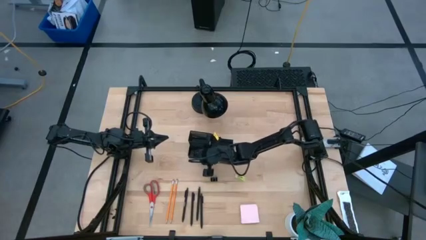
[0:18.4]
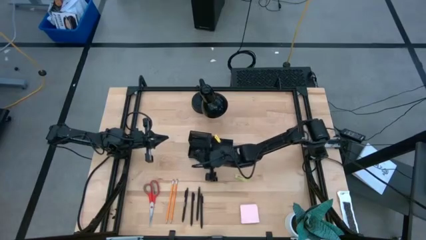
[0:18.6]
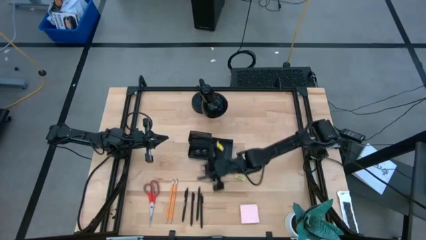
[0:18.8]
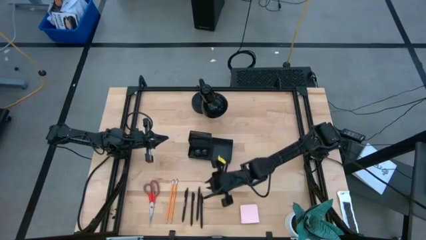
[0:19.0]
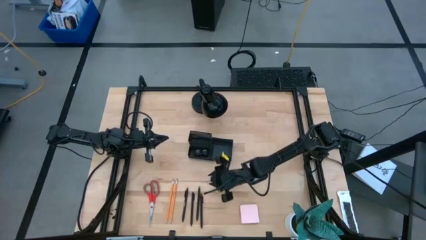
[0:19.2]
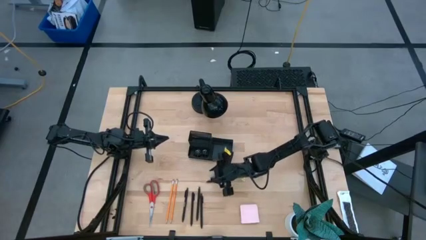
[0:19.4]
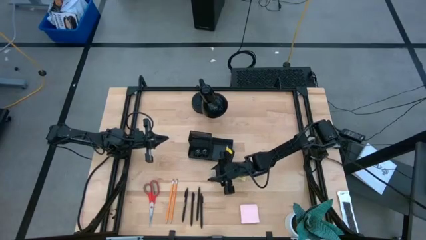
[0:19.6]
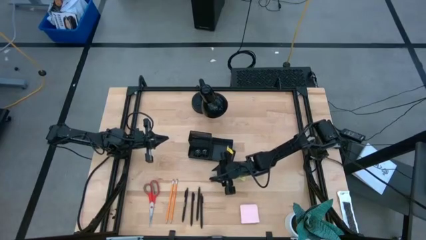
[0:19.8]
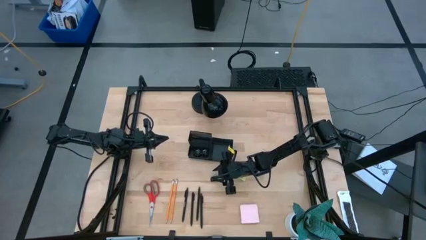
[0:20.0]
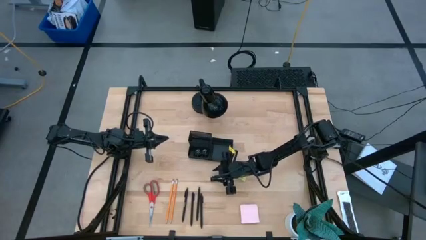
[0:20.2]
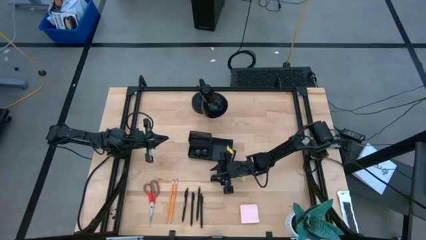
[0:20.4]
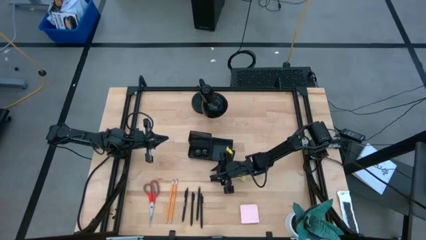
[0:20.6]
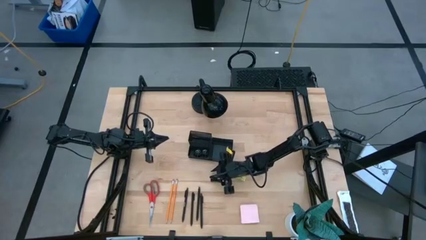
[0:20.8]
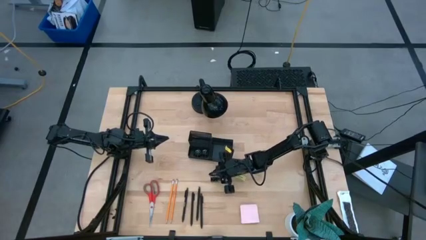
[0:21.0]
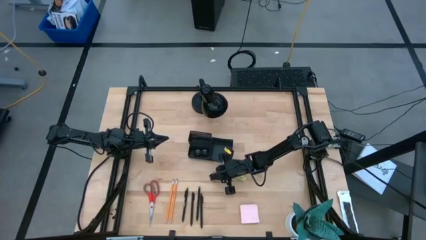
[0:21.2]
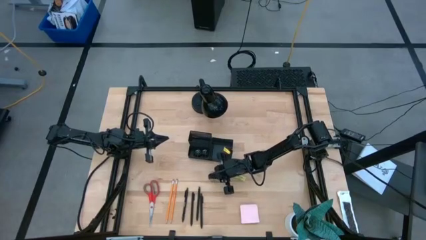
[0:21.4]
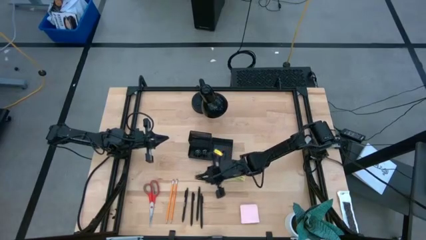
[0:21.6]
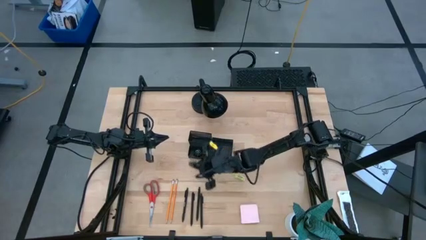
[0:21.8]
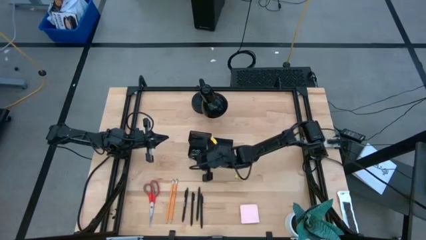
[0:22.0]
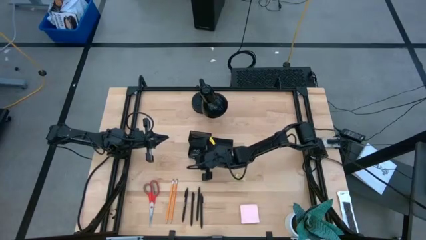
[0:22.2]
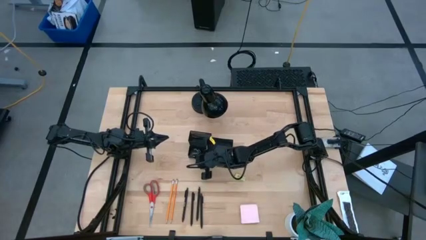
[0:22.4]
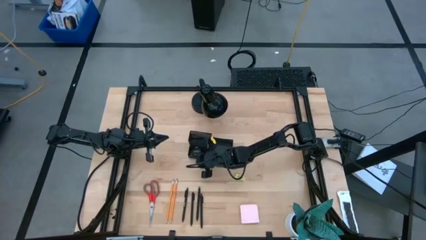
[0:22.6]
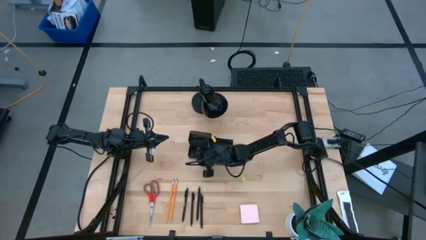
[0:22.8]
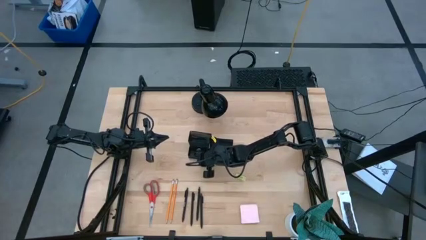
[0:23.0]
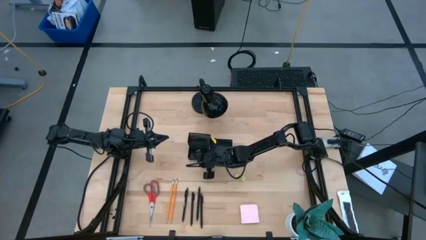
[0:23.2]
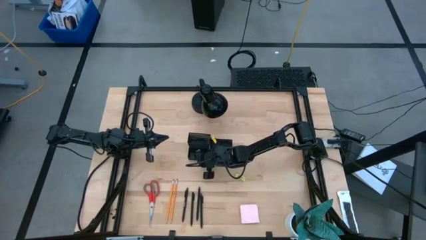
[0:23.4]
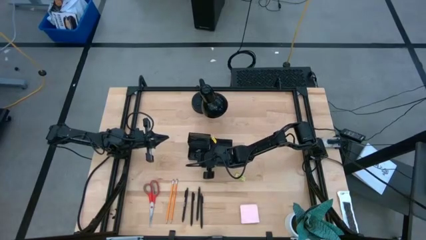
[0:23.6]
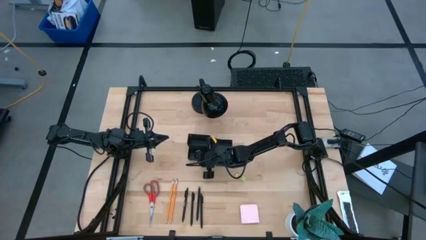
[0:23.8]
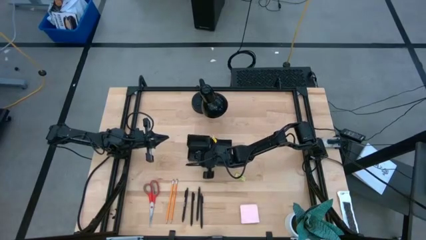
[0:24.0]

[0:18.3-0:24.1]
Task: Pick and place office supplies into organizer
Put the black binder clip into the black desk organizer

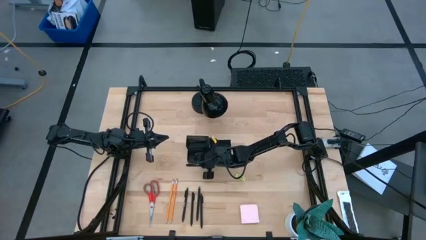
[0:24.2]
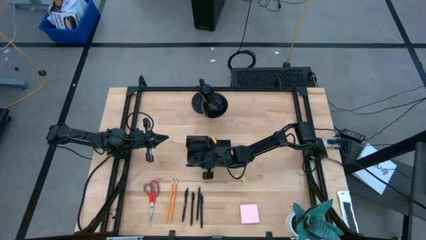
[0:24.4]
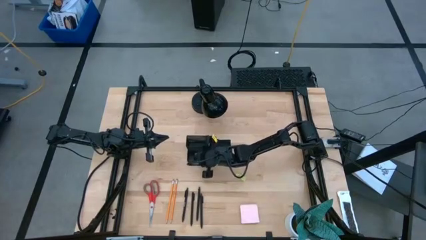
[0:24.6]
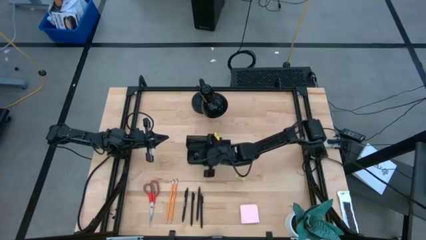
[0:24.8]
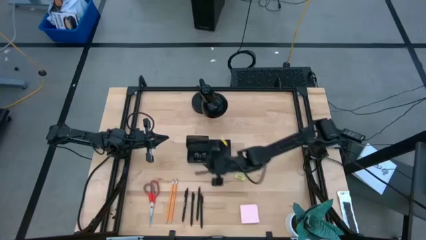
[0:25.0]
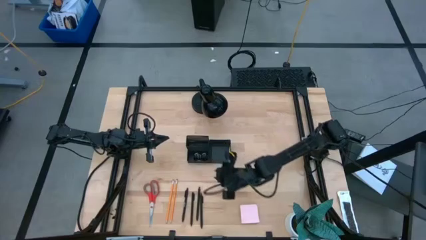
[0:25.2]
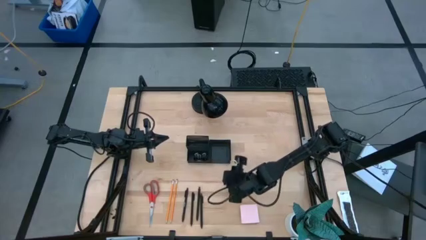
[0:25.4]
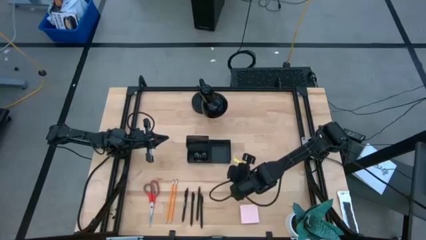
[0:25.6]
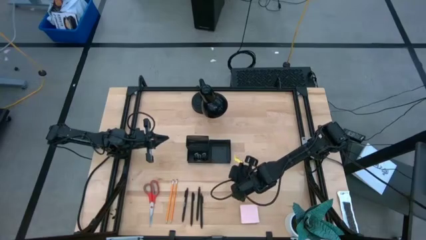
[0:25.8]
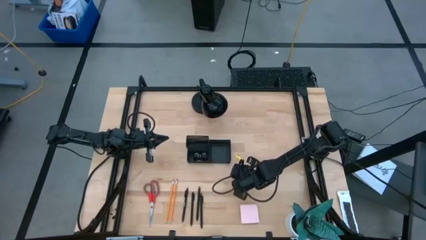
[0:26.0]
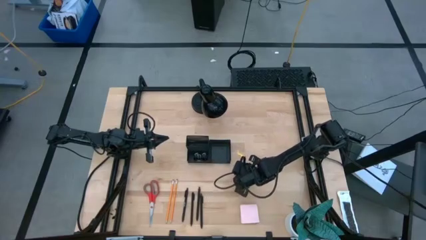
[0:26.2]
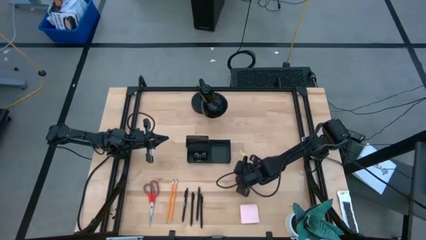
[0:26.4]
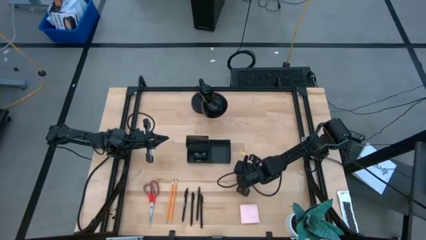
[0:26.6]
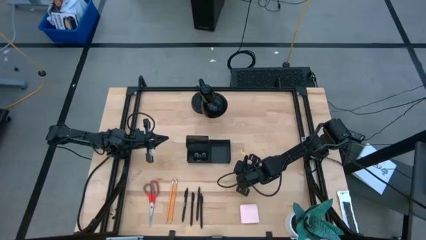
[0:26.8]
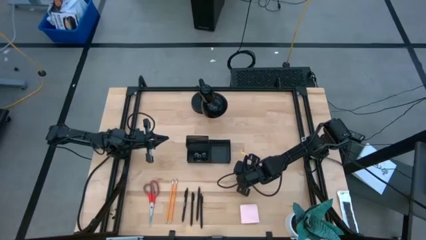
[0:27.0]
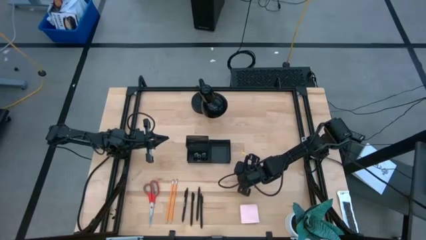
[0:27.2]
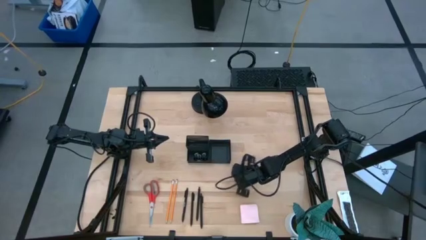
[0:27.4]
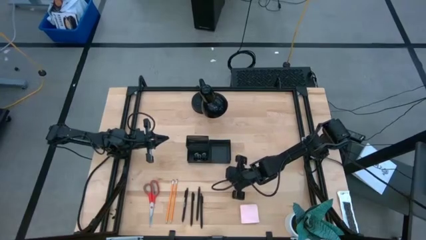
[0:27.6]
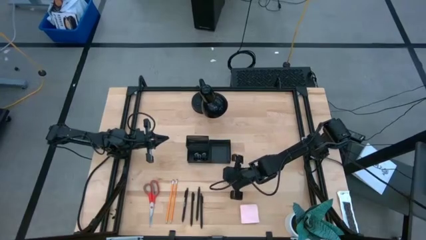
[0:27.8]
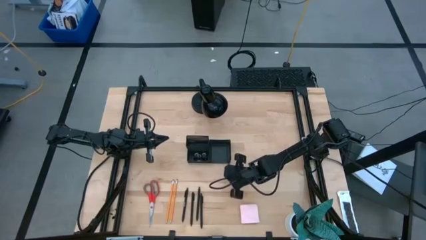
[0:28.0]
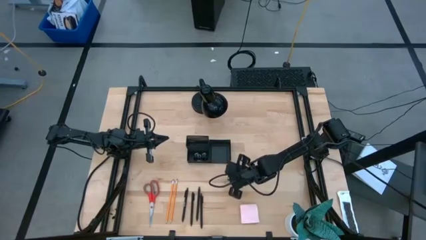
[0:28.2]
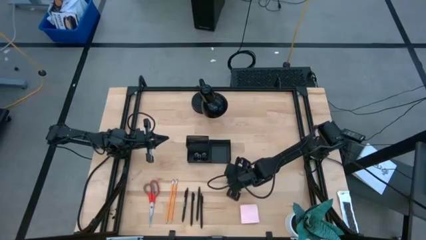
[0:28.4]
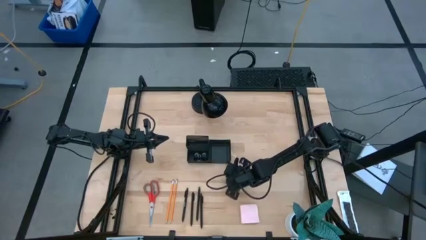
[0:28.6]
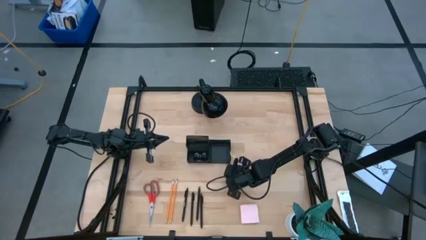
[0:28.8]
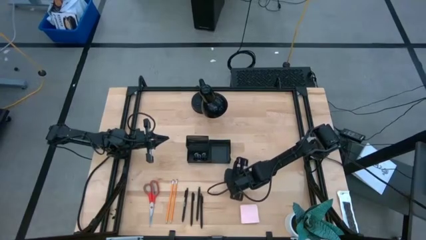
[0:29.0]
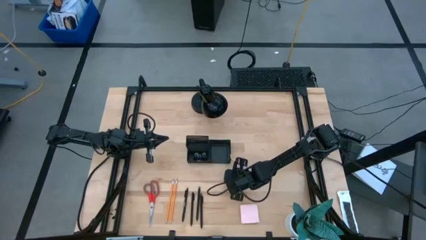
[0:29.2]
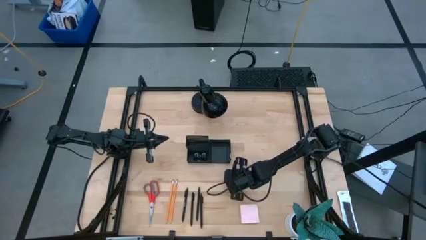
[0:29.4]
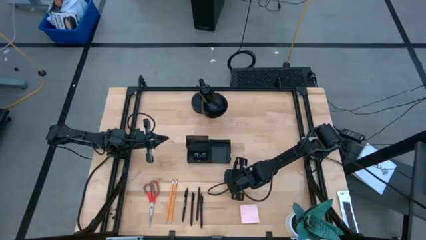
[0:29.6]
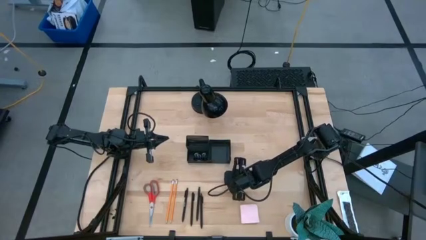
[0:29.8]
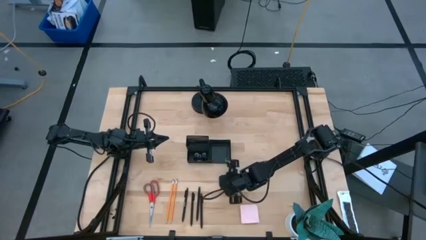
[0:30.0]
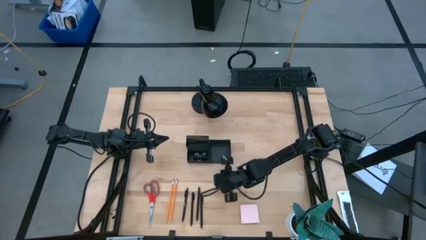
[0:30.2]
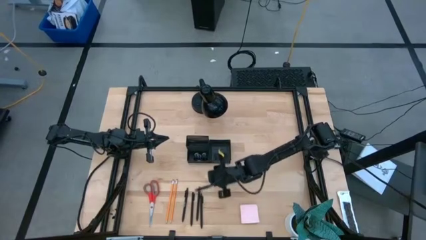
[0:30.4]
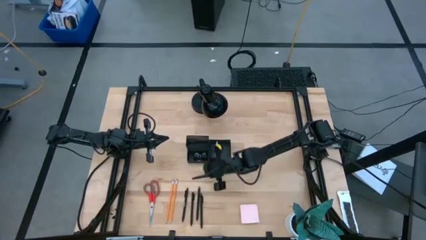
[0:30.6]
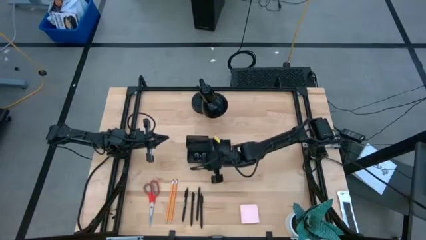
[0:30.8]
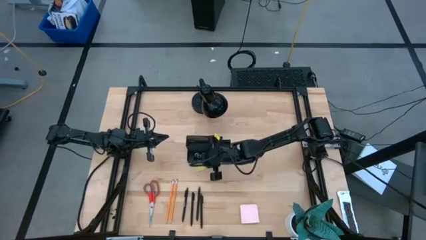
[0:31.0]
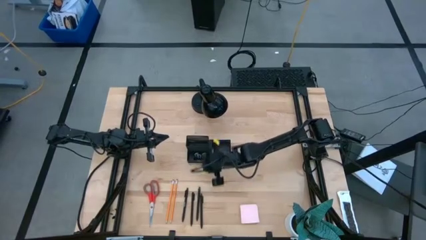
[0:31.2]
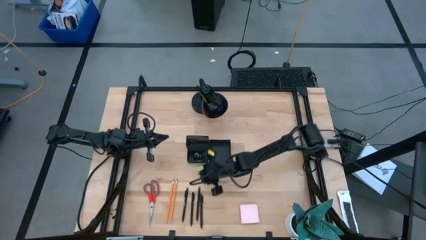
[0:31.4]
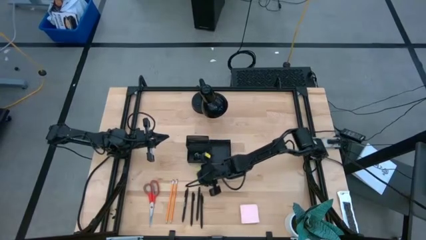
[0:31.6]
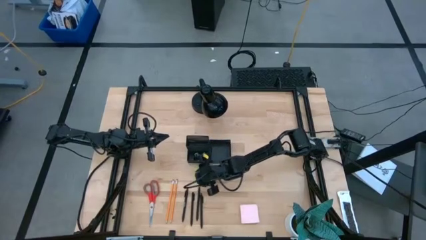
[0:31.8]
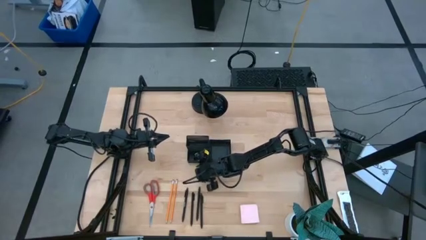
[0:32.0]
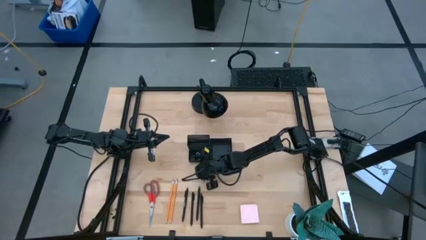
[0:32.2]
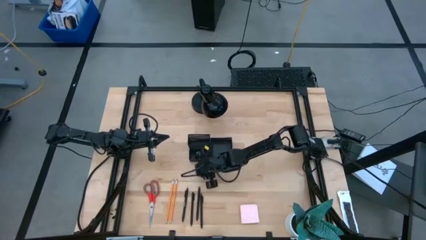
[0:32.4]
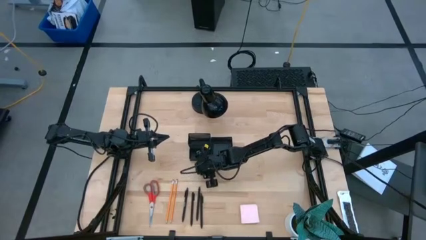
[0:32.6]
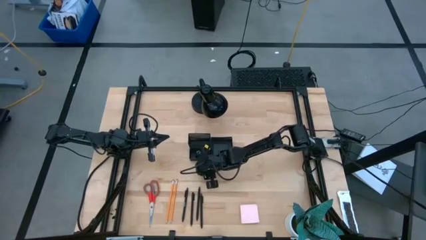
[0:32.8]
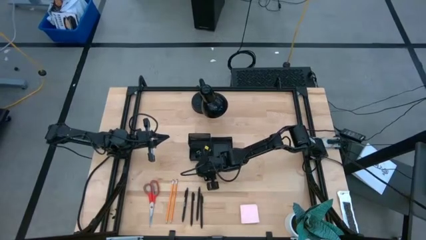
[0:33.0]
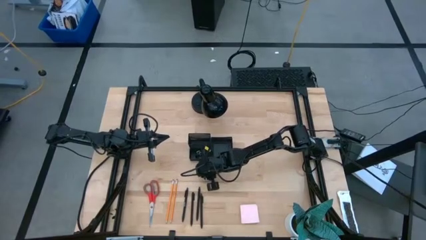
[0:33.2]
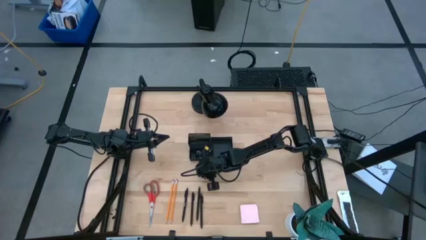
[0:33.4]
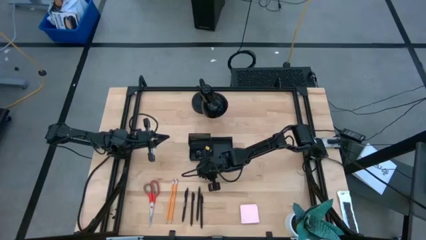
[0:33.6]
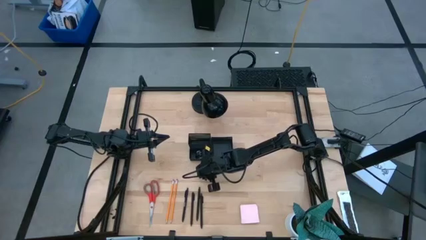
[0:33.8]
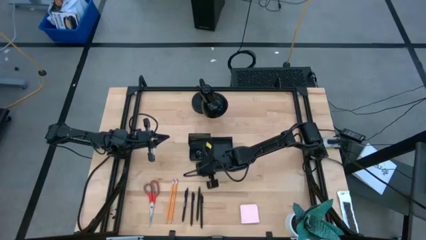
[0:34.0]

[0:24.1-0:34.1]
Put the yellow eraser into the black desk organizer

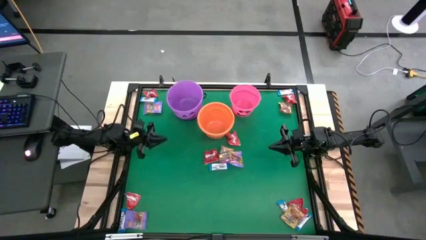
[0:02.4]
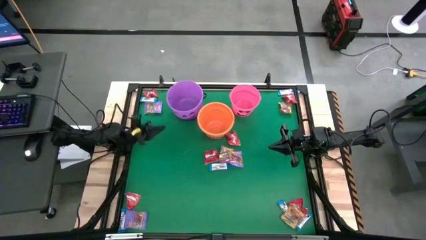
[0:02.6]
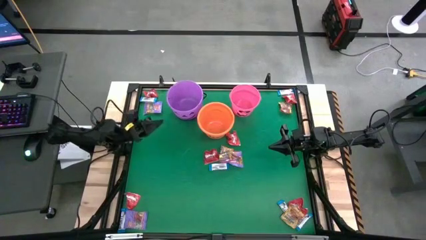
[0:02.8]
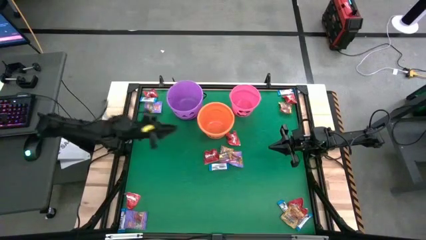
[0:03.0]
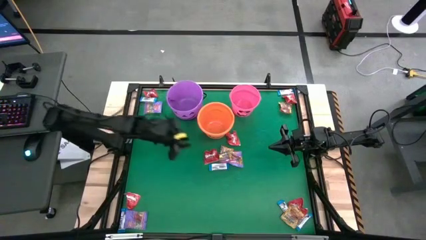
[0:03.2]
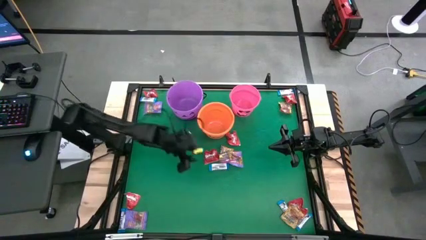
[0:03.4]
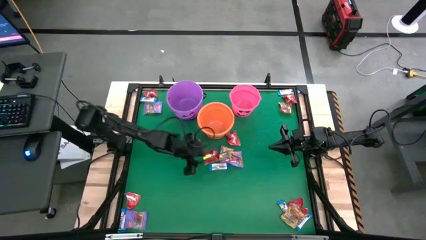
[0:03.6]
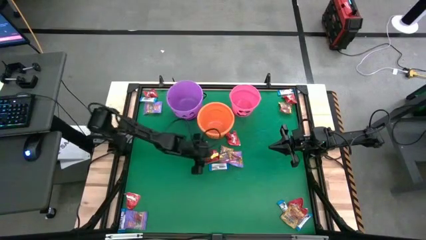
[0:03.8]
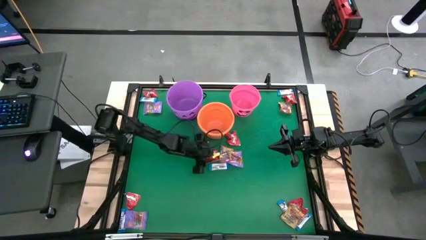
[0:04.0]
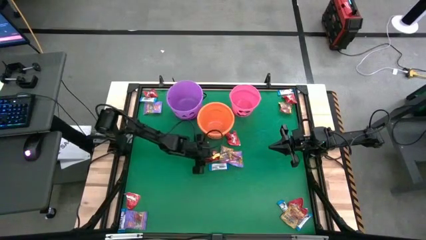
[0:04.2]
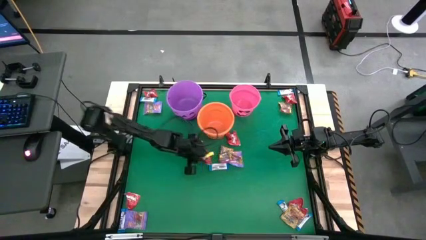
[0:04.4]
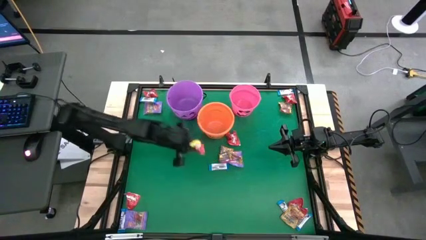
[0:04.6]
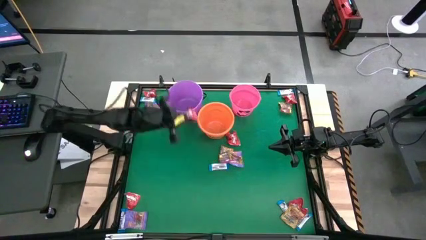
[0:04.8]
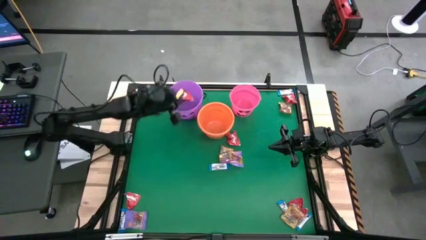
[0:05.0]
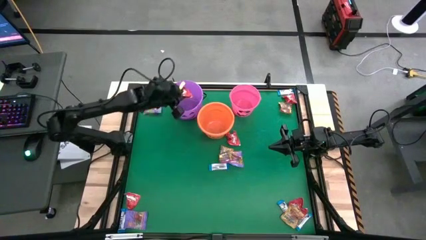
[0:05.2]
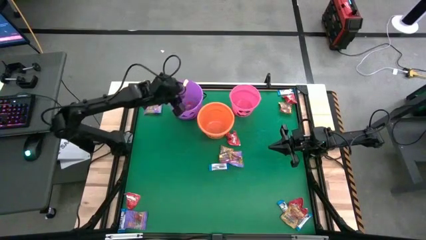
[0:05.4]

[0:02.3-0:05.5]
Task: Sort candy by brand, put in halloween buckets
Put the red candy into the purple bucket
